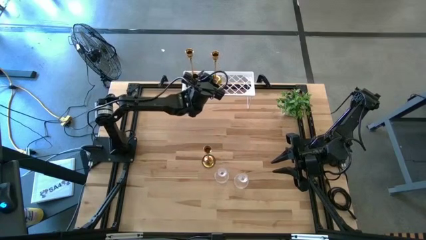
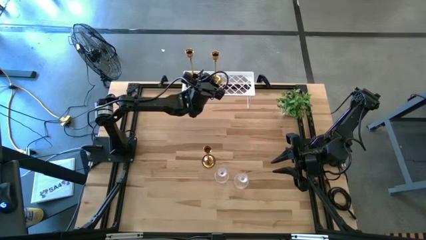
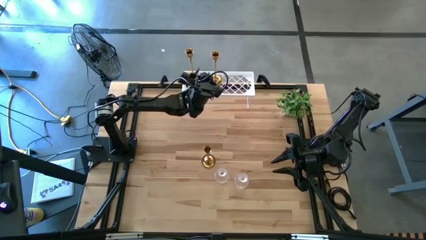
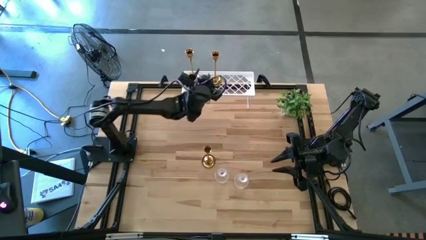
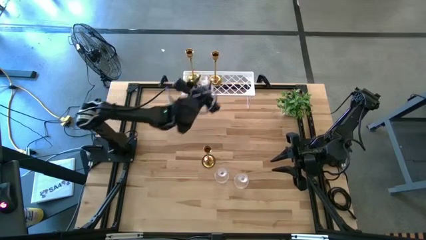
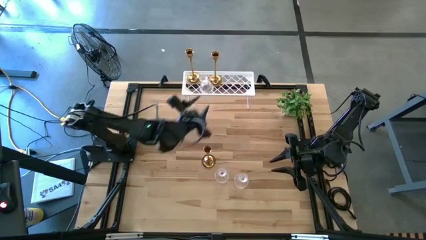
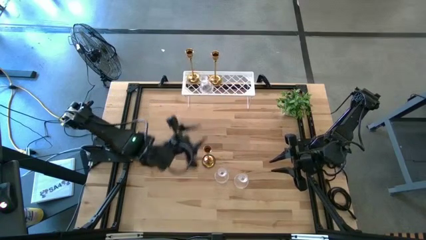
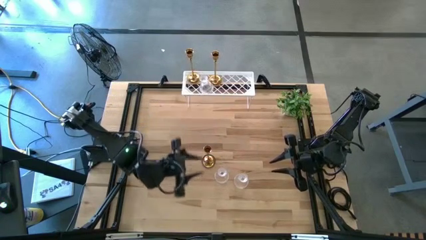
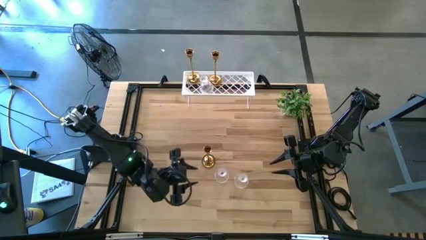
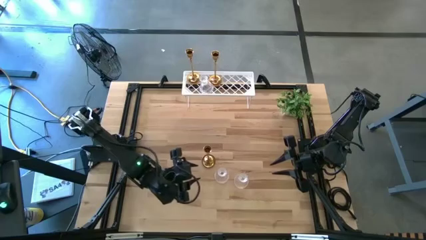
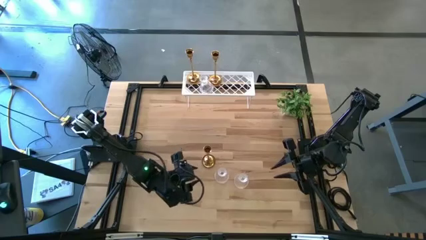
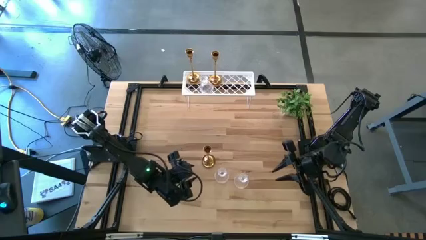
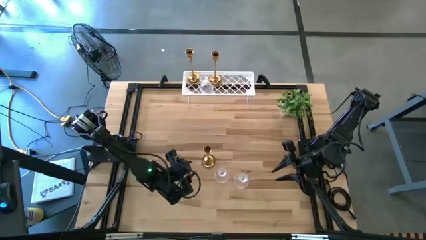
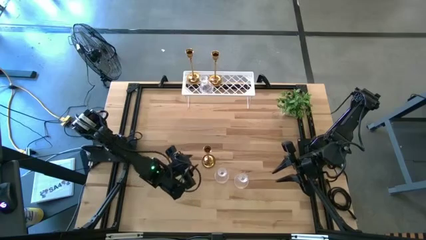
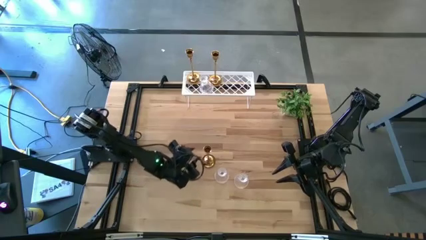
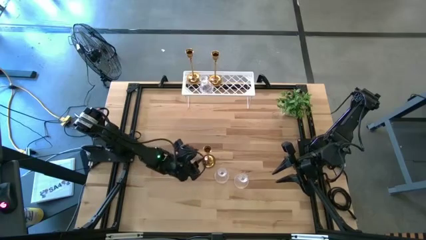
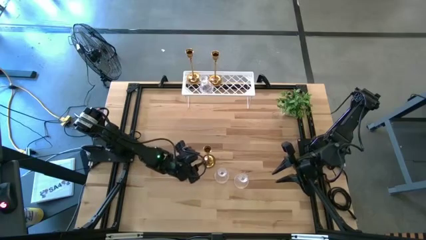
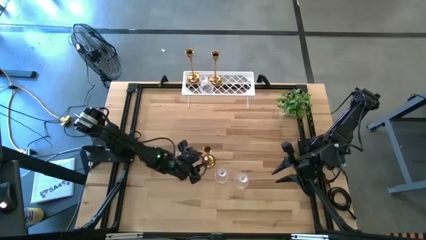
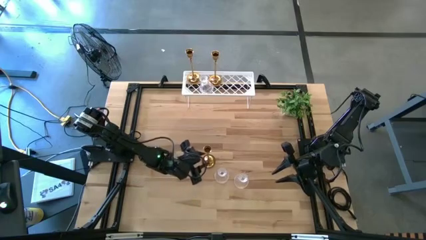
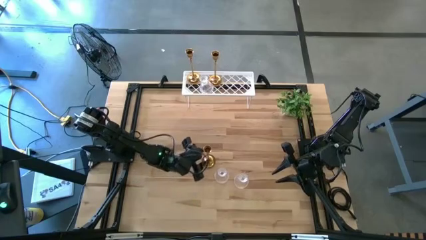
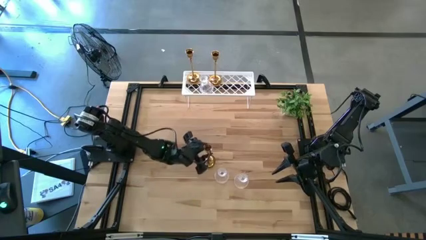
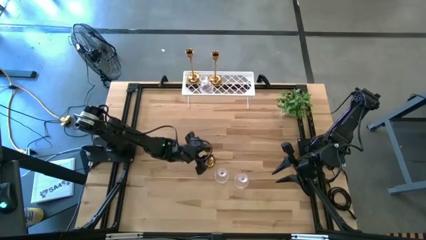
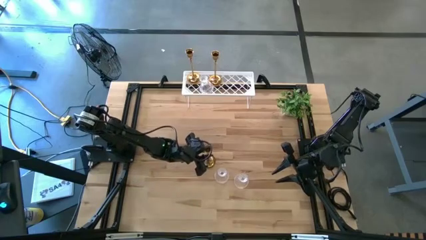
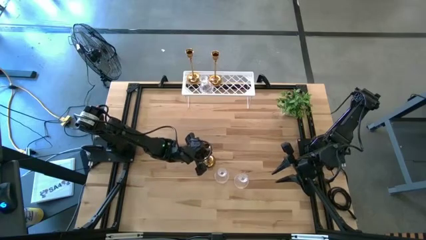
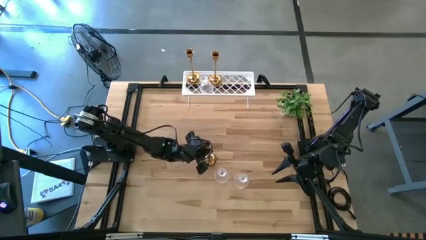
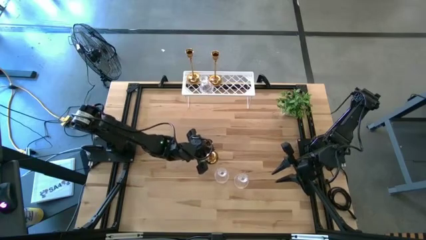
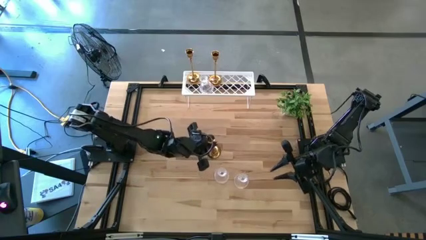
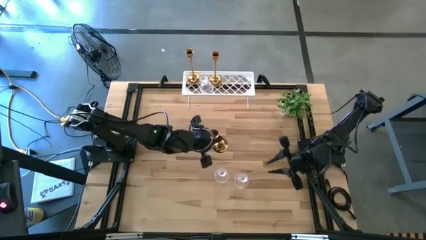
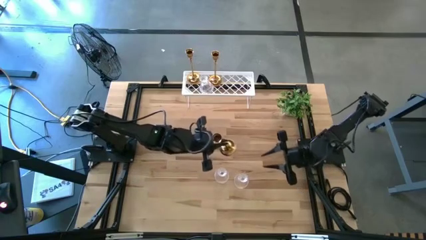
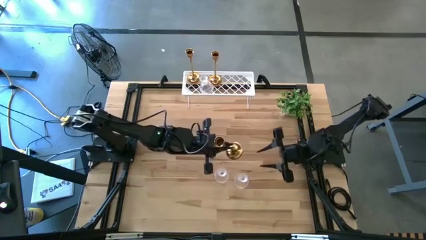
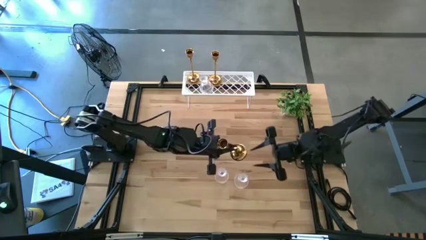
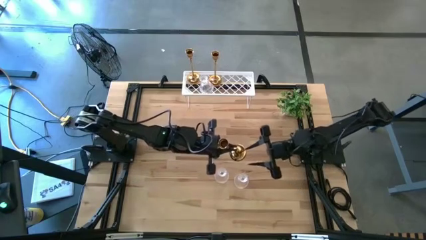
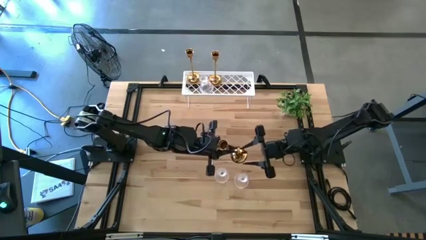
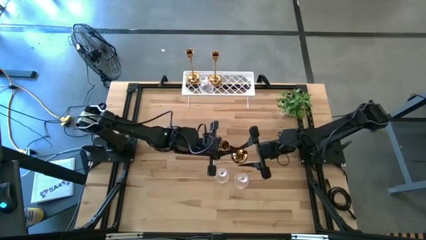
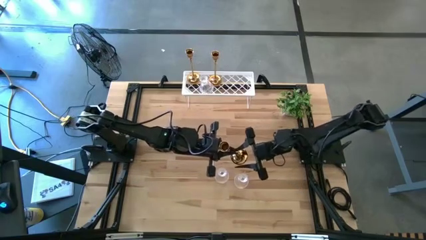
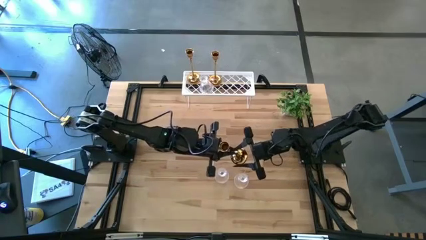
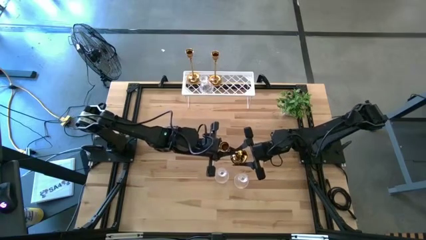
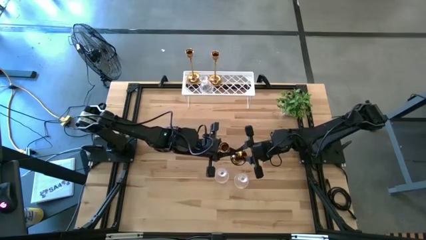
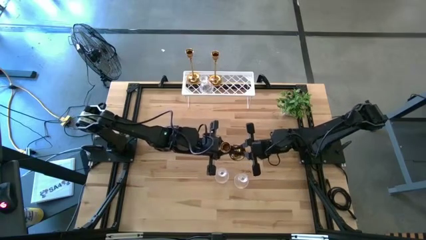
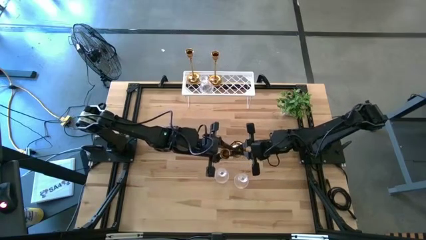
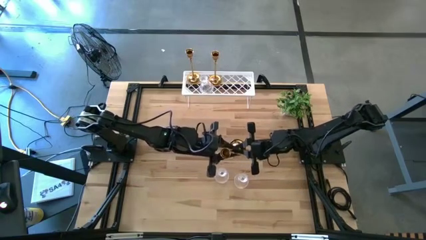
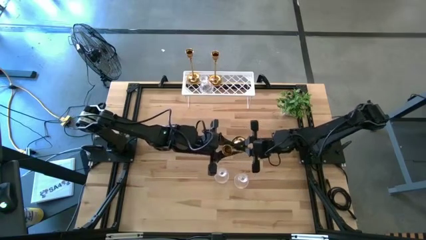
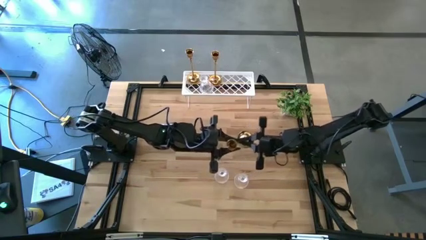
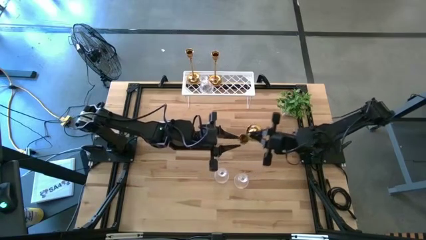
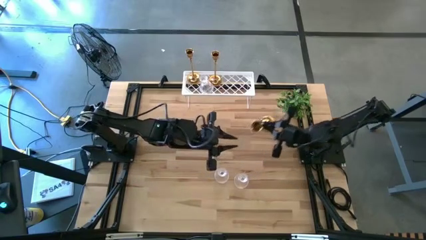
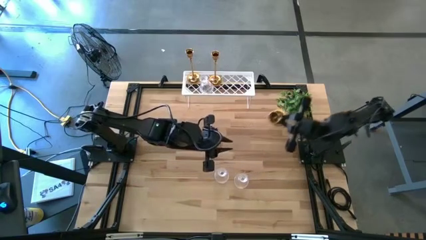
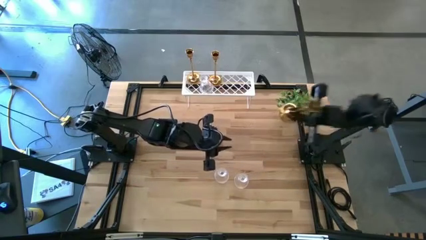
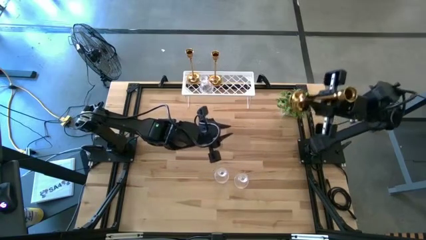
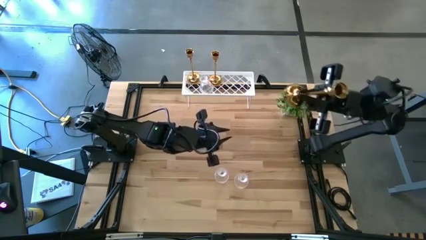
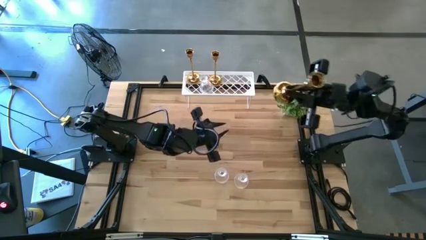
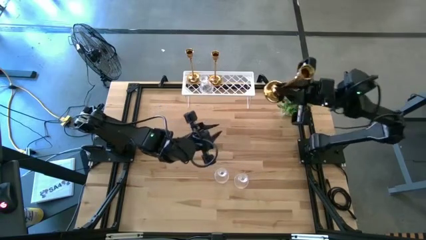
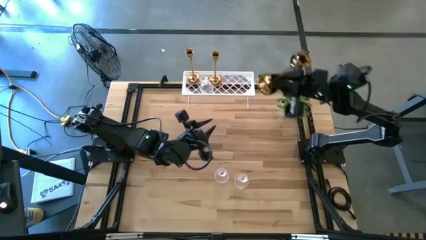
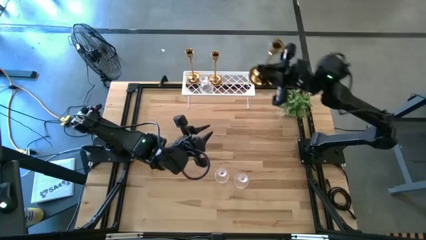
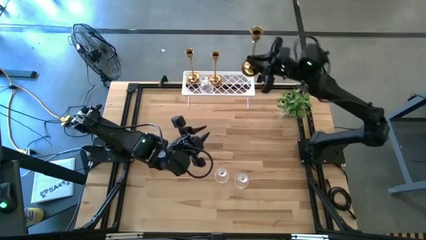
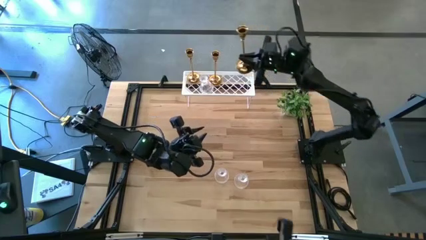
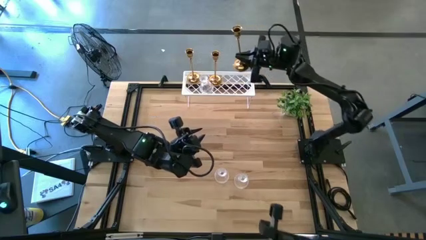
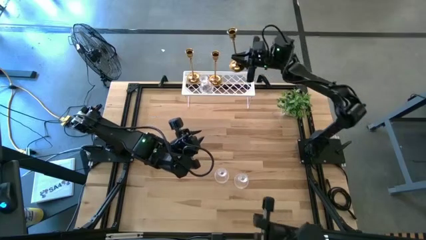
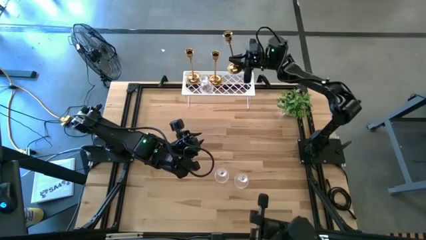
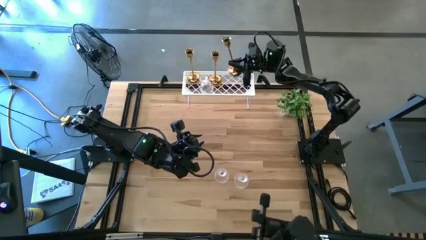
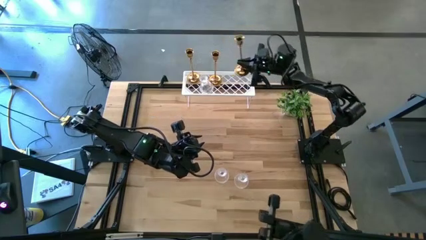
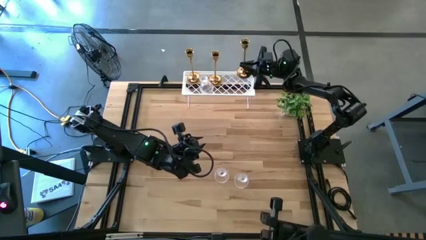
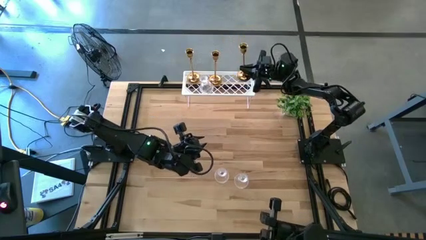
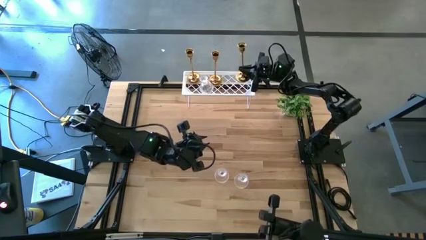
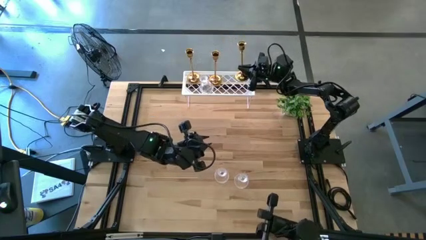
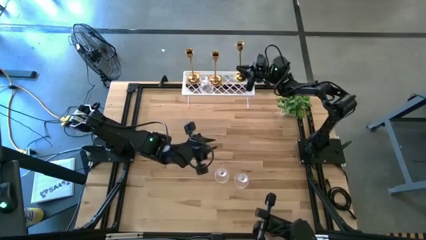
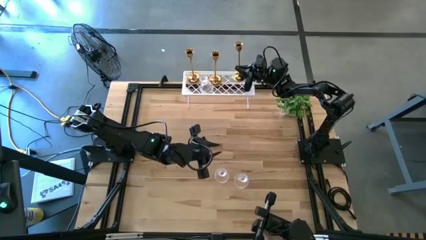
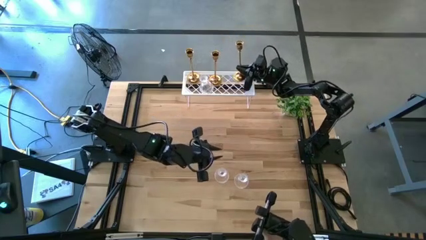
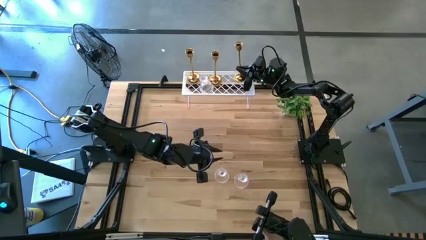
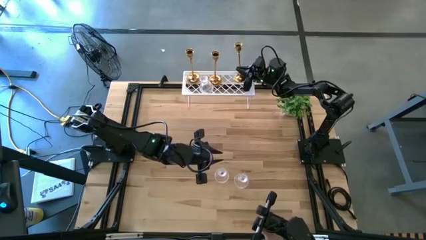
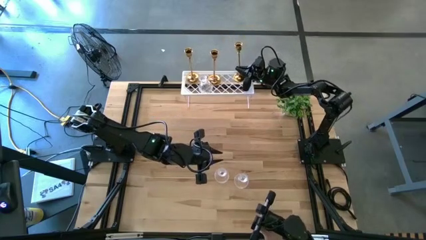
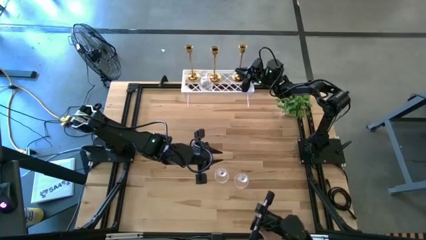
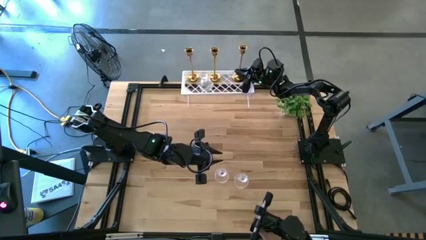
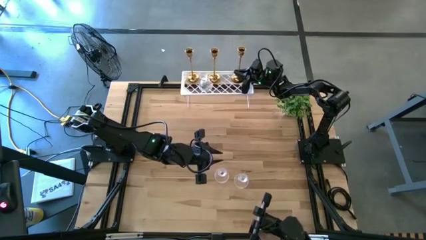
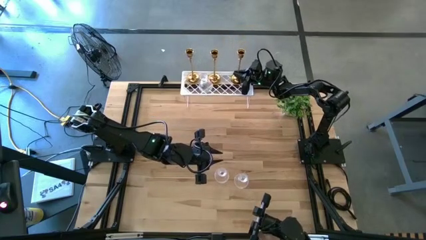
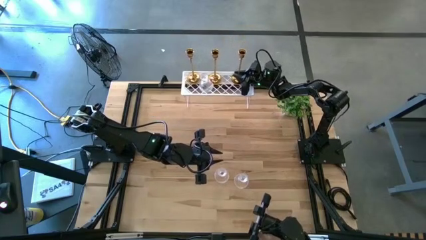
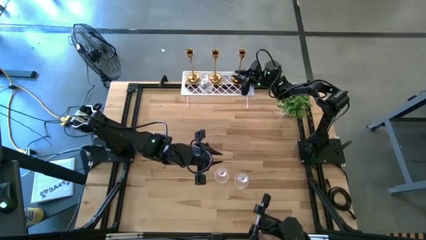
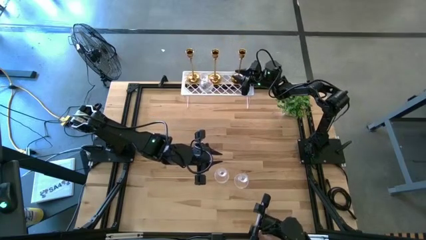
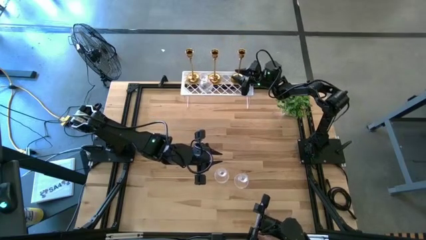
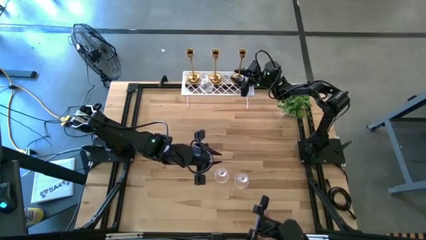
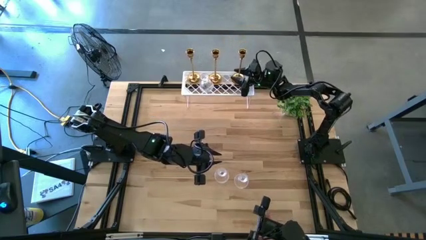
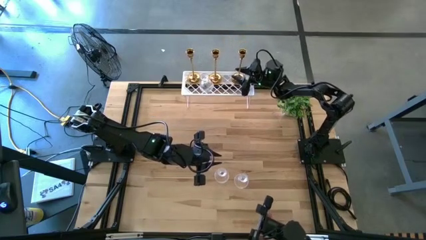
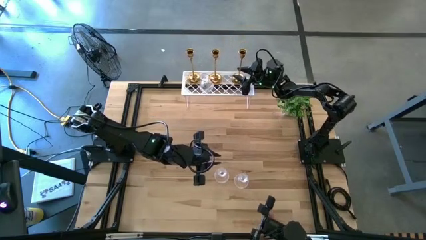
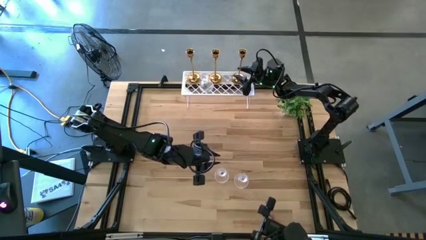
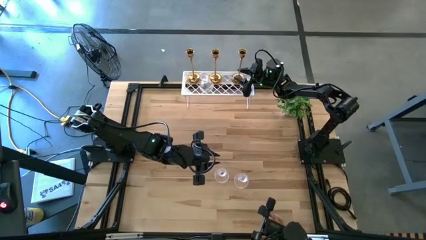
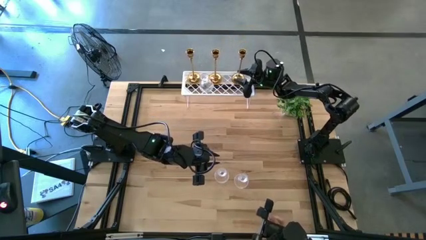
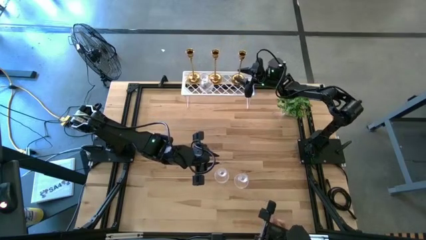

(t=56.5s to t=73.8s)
Task: Pick & Place candle stick holders
Put the gold candle holder on the shelf
